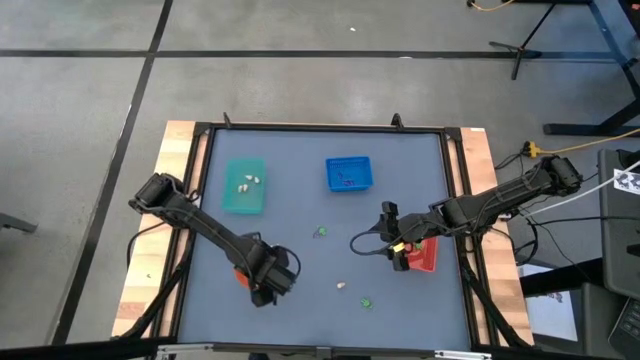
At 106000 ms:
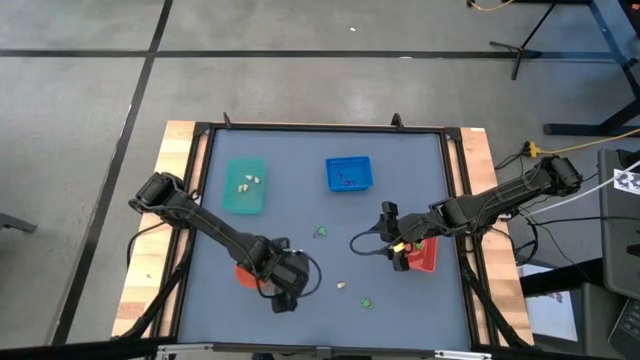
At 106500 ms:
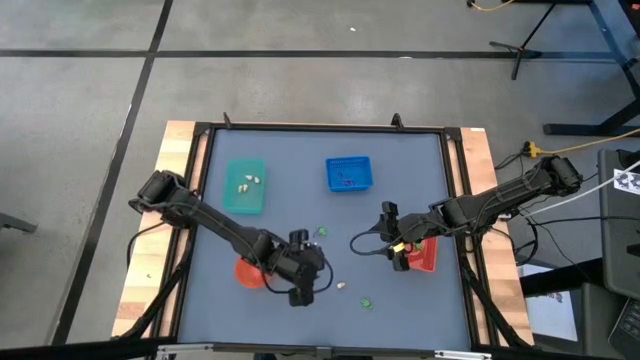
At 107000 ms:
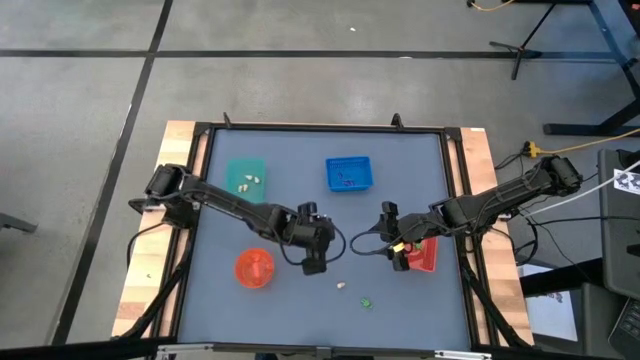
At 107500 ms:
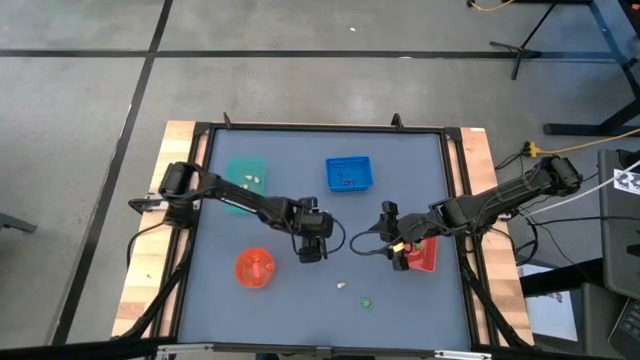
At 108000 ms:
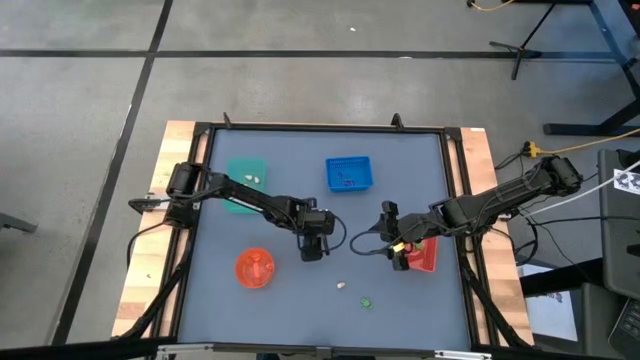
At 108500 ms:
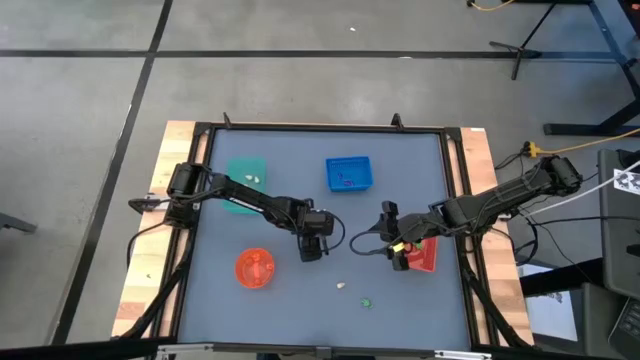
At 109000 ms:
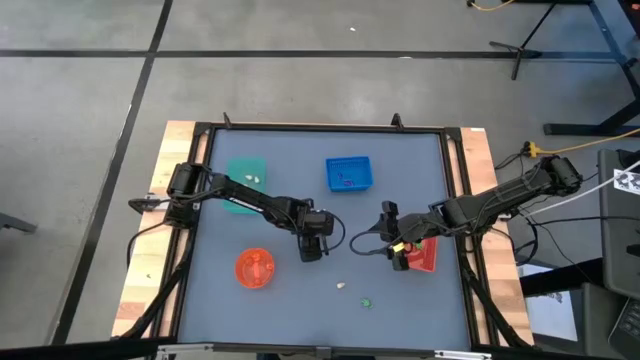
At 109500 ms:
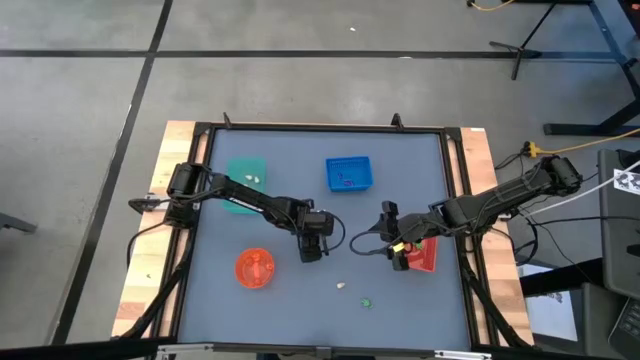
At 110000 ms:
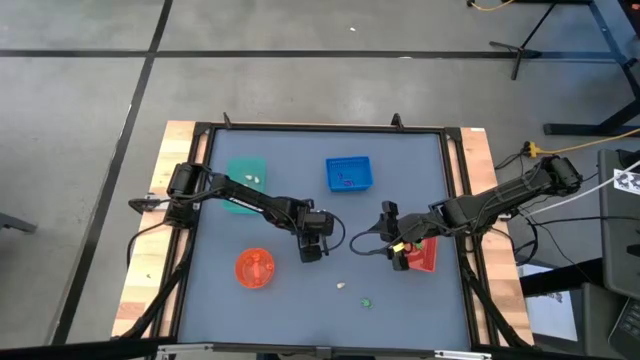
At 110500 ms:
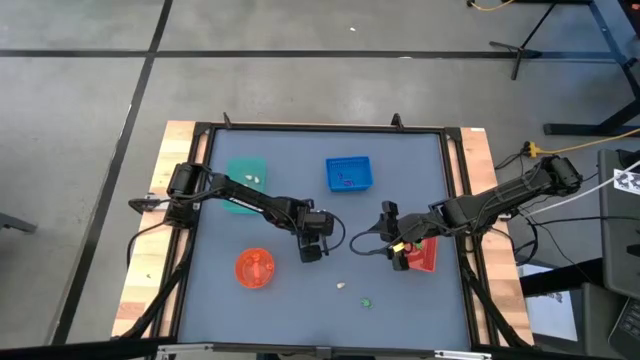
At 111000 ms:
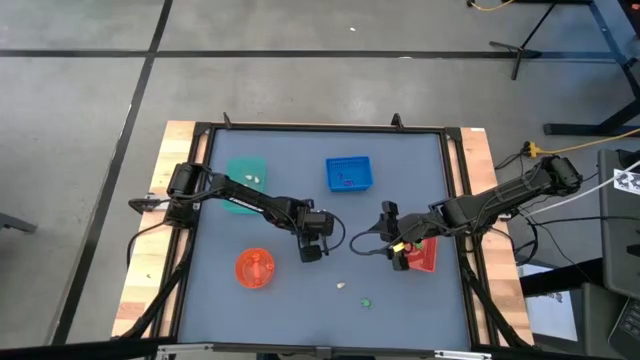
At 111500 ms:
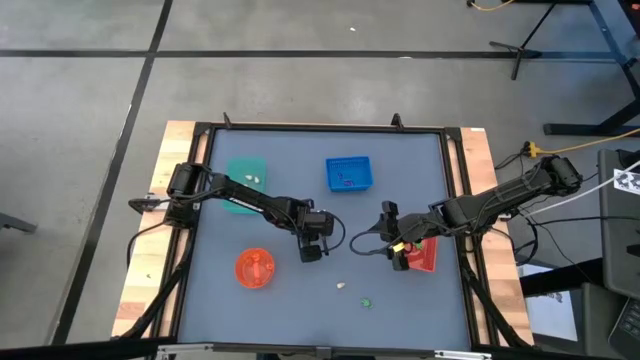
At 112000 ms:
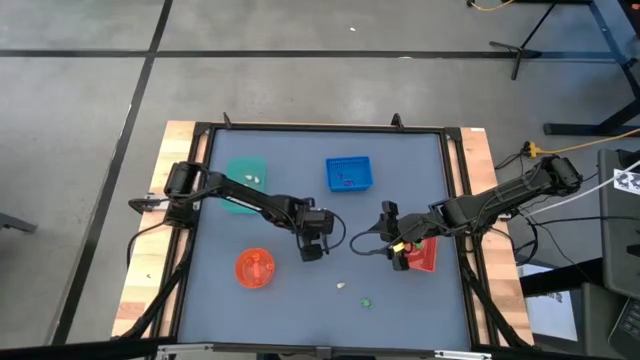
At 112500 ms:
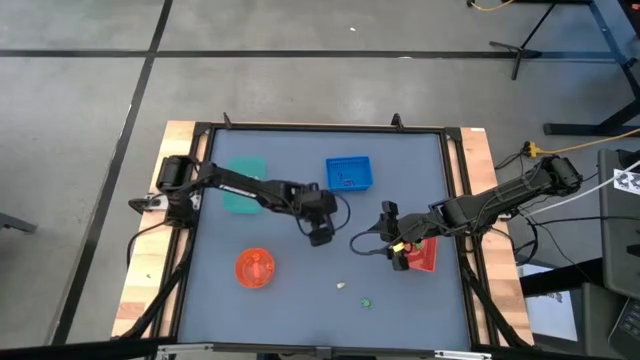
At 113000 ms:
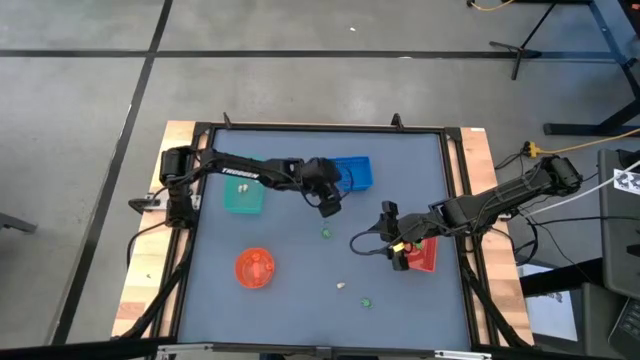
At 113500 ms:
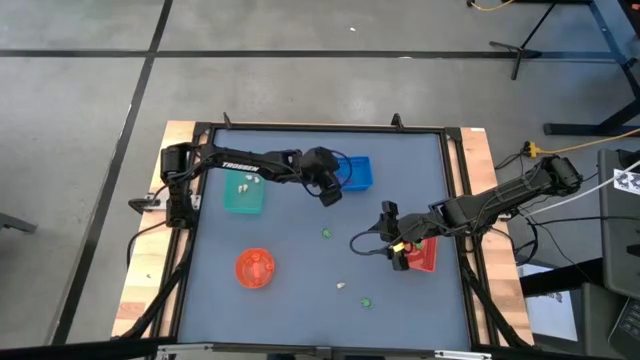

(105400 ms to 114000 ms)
Task: Sort Halloween decoration
Put the purple hat toy into the blue bin

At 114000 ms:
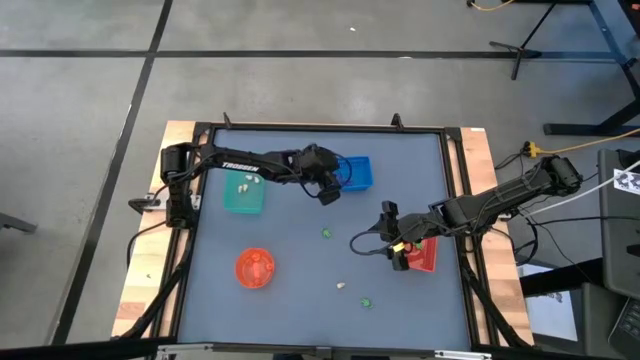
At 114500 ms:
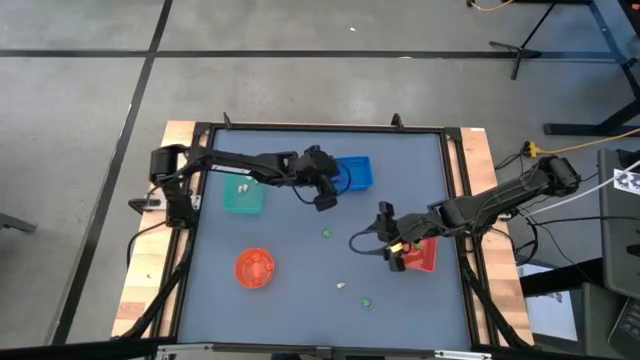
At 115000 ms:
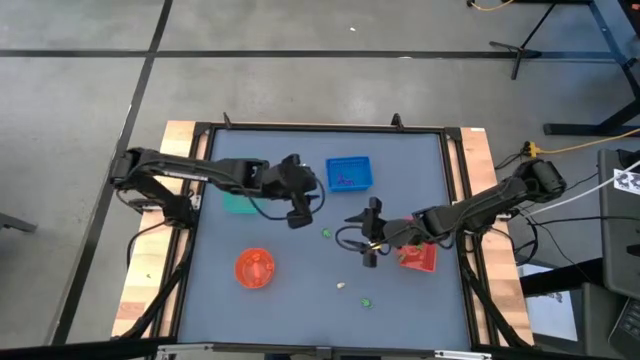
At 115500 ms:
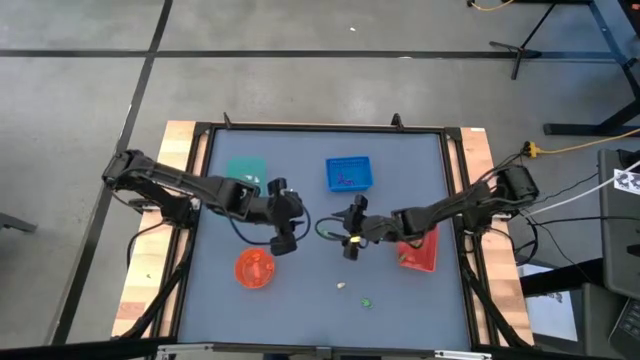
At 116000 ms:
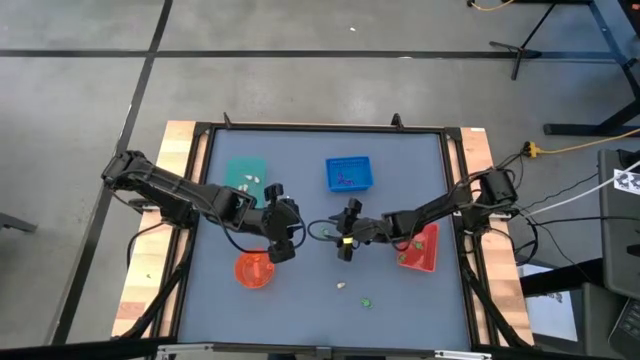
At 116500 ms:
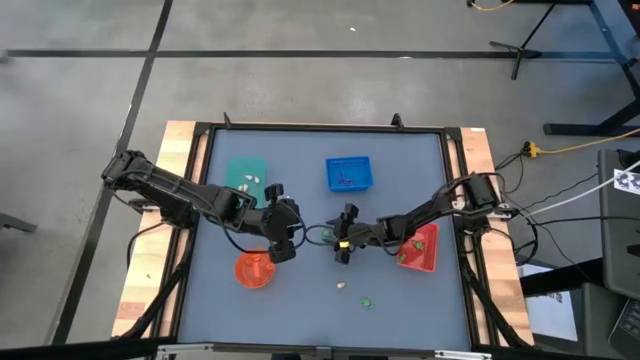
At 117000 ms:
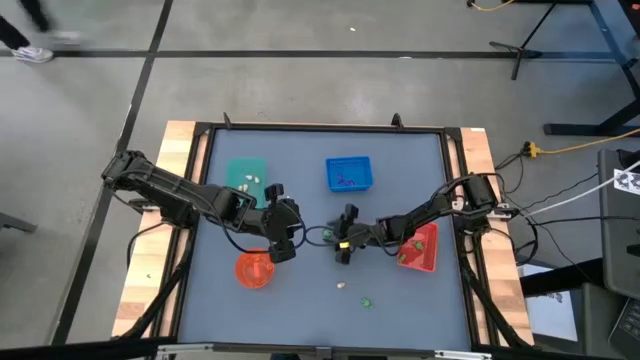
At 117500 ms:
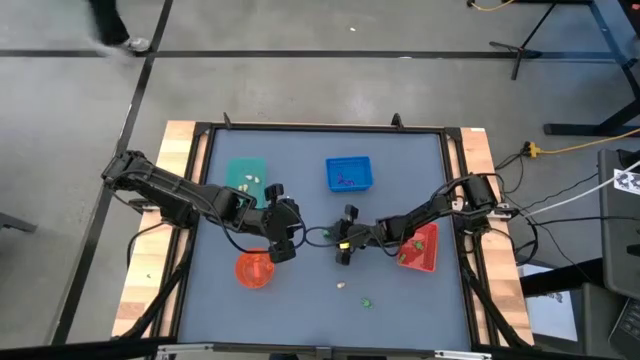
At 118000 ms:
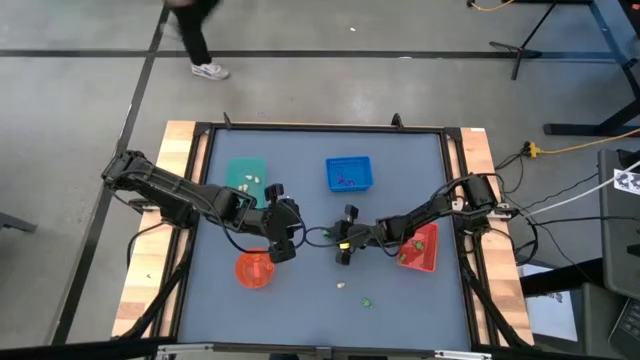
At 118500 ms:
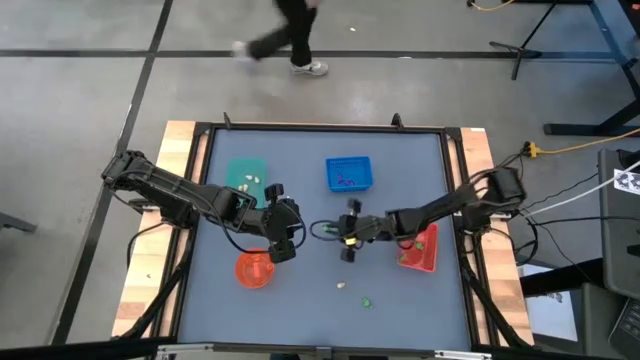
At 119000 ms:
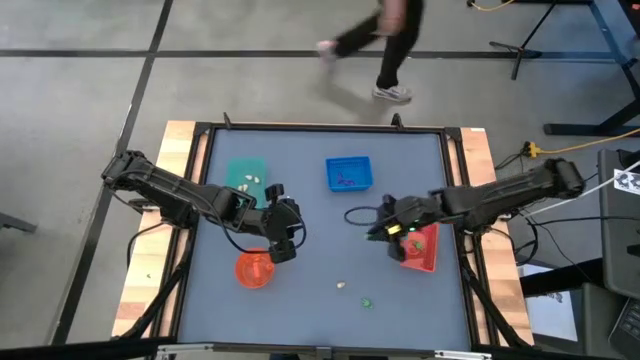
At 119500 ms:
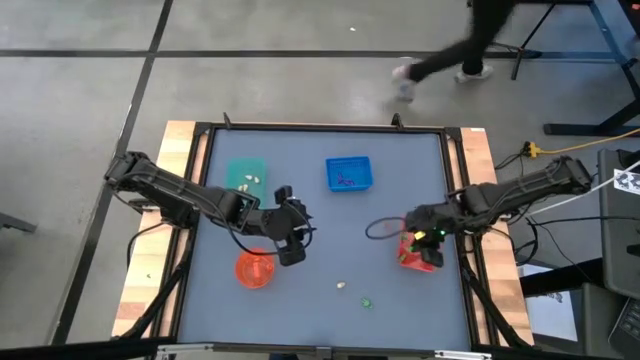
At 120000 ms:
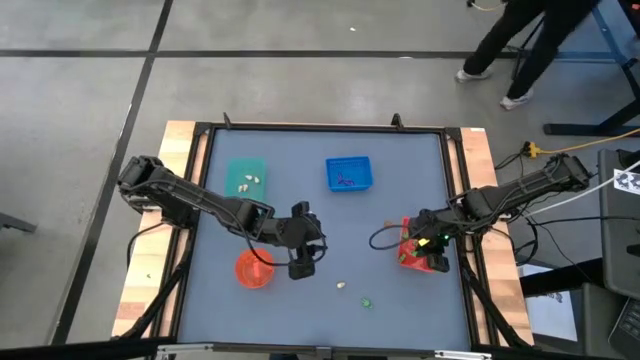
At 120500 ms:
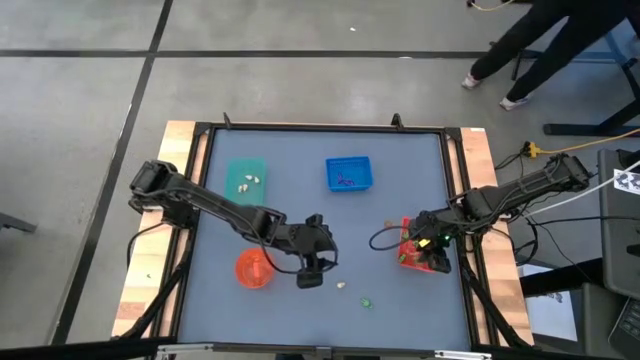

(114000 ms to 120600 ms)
Put the green skeleton toy into the orange bin

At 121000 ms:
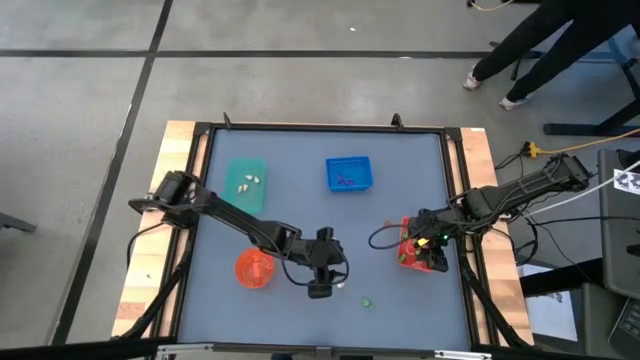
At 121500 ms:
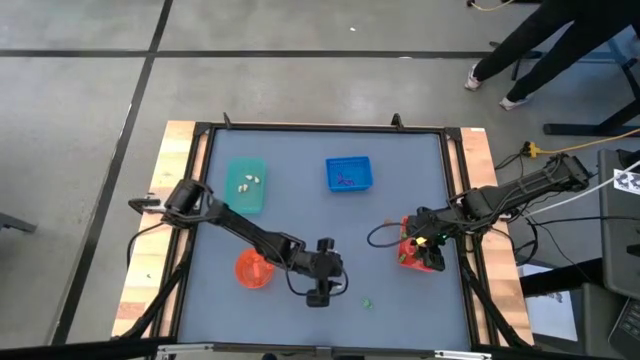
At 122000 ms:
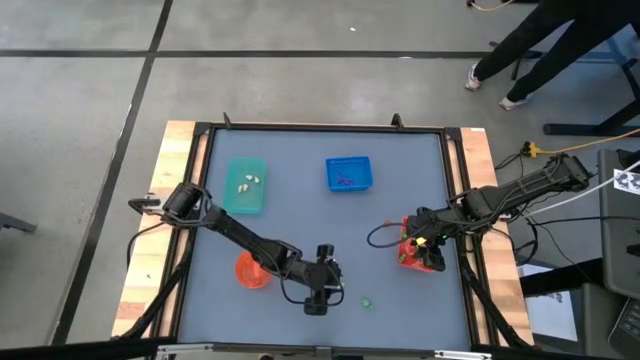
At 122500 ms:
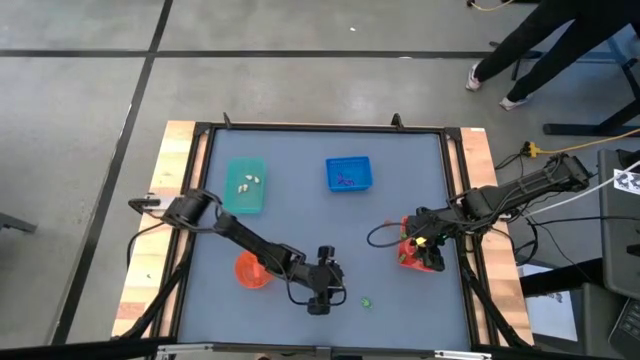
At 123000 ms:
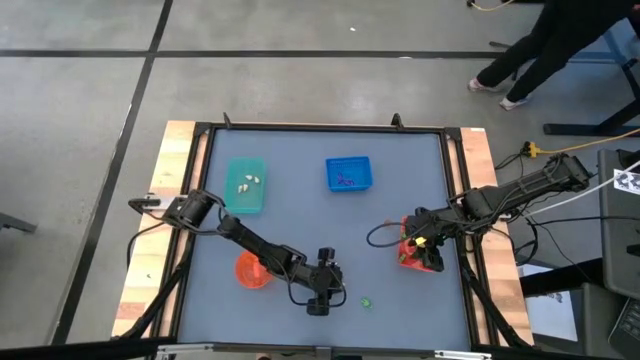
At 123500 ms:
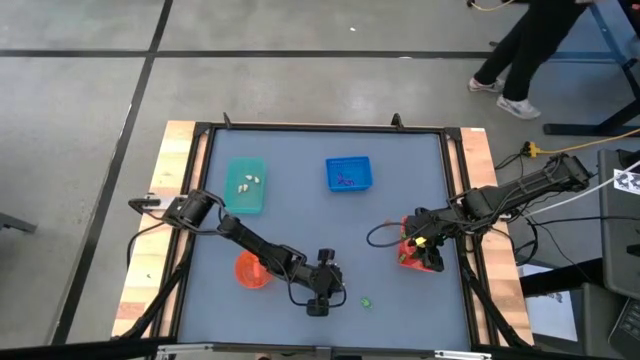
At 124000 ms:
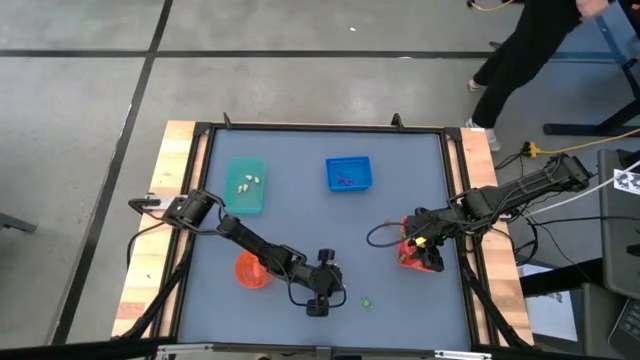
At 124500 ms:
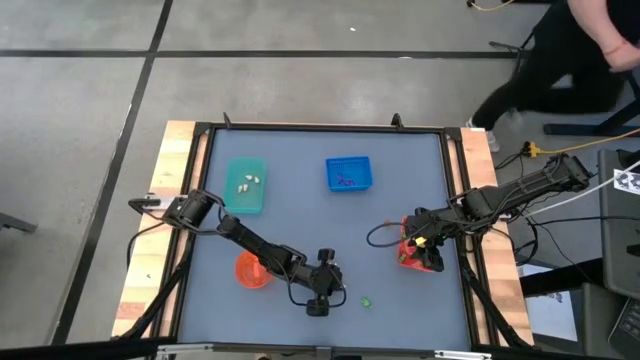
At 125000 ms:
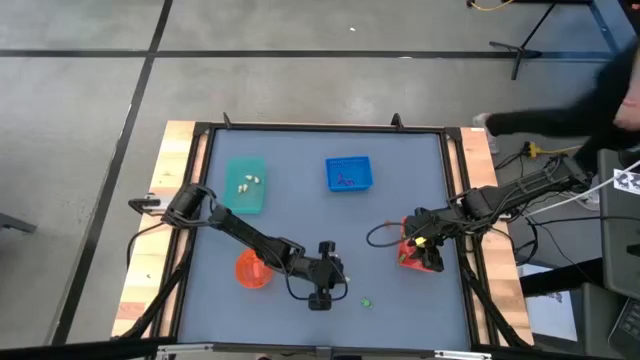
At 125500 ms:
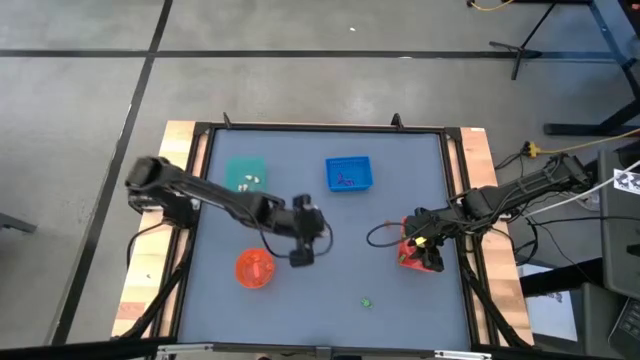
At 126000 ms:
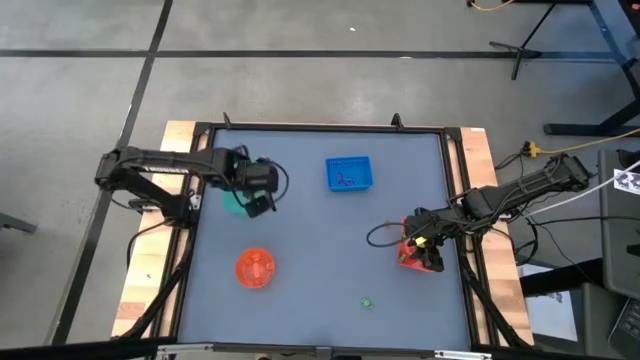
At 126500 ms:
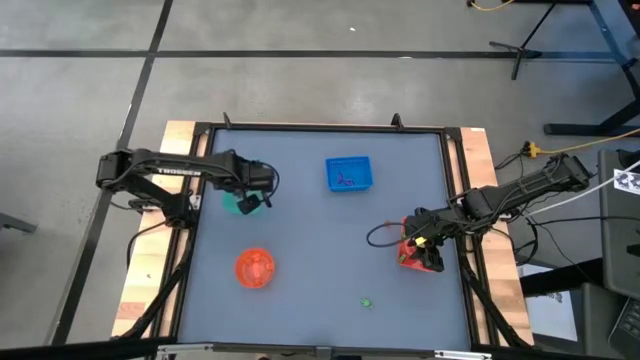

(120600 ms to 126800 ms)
Put the white skull toy into the green bin
